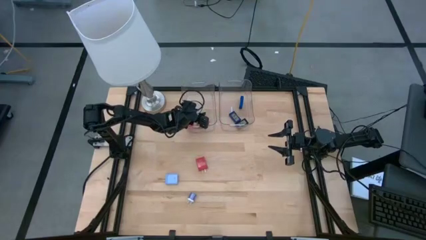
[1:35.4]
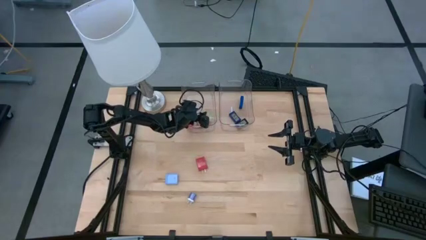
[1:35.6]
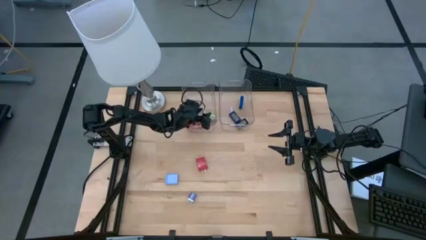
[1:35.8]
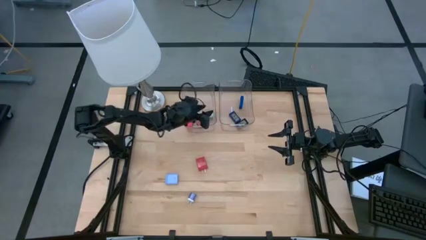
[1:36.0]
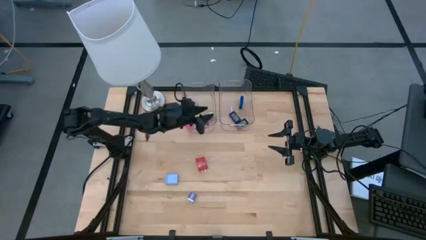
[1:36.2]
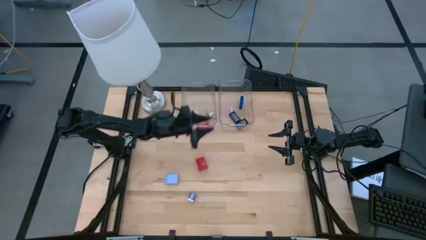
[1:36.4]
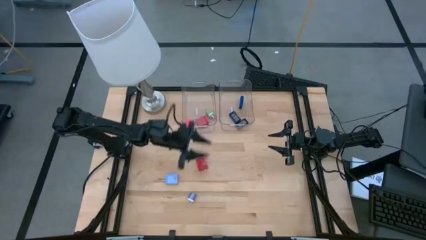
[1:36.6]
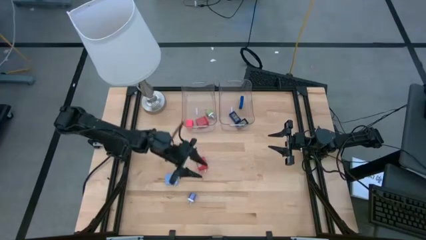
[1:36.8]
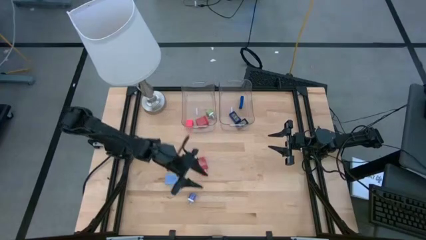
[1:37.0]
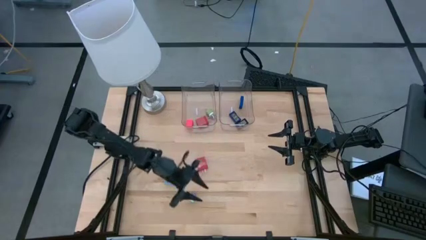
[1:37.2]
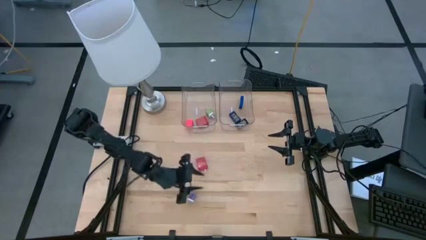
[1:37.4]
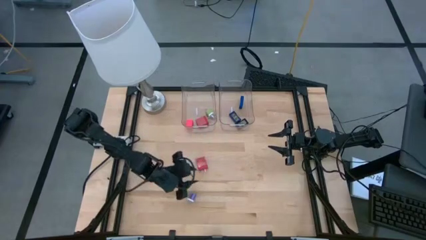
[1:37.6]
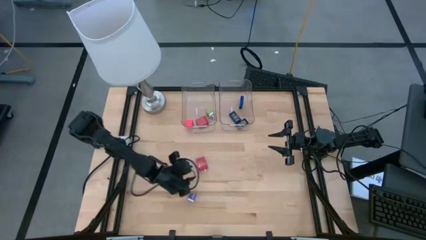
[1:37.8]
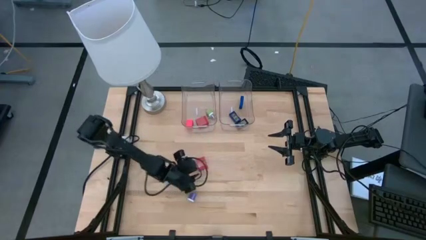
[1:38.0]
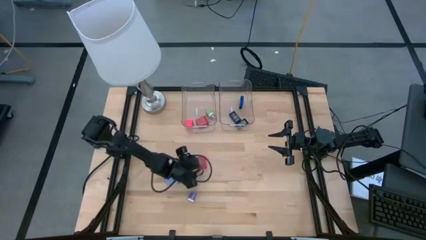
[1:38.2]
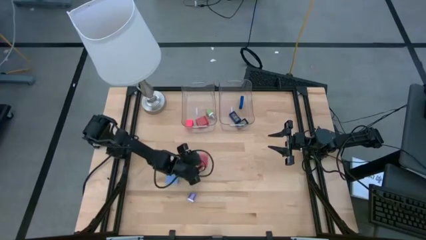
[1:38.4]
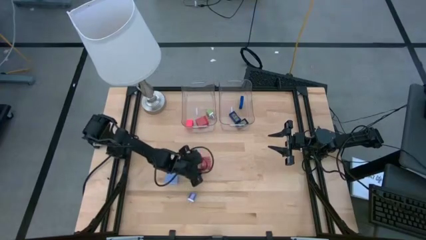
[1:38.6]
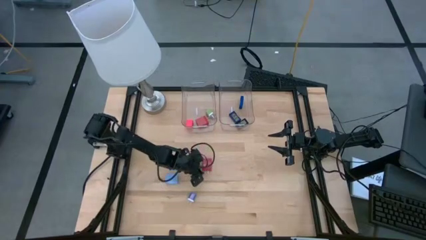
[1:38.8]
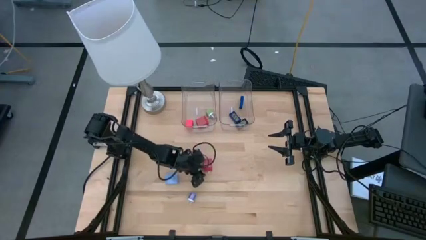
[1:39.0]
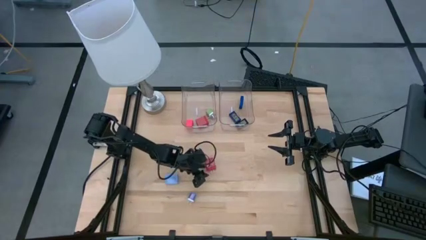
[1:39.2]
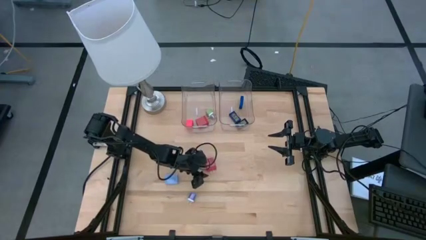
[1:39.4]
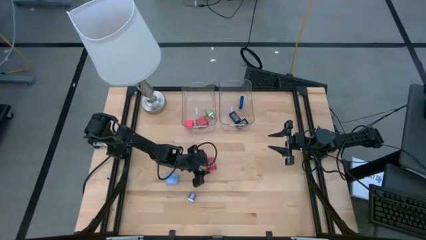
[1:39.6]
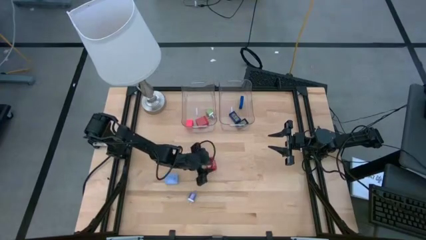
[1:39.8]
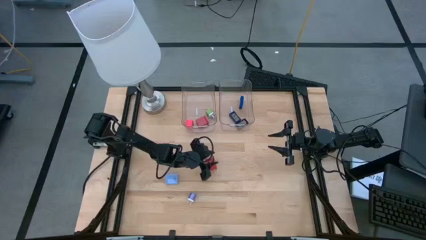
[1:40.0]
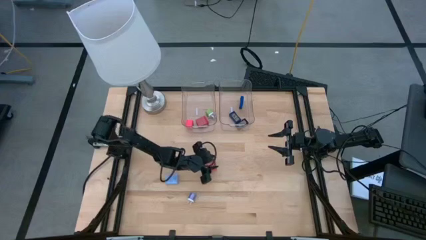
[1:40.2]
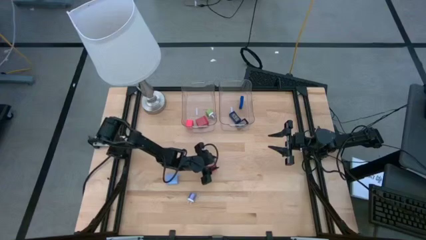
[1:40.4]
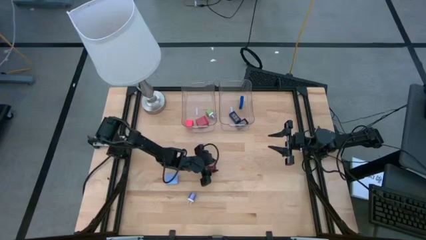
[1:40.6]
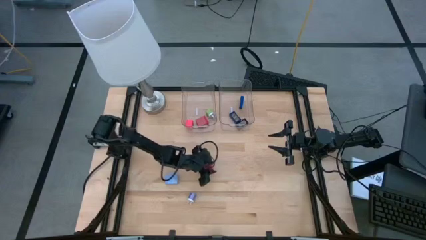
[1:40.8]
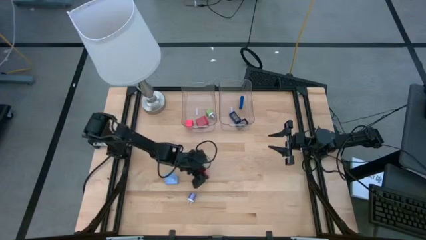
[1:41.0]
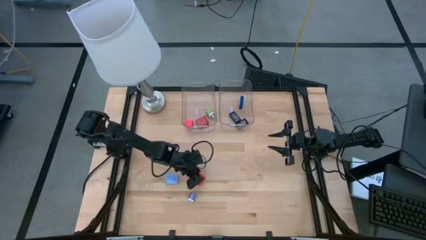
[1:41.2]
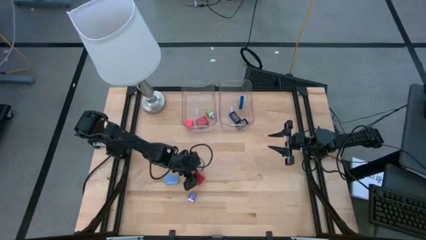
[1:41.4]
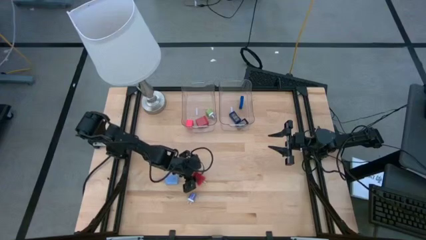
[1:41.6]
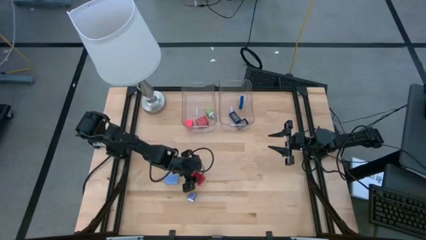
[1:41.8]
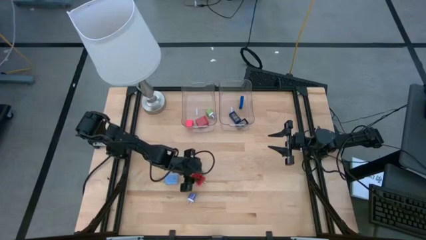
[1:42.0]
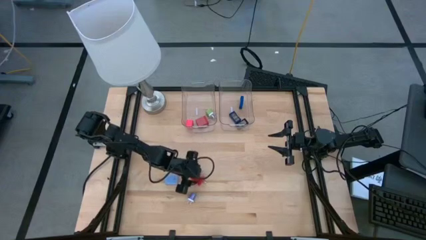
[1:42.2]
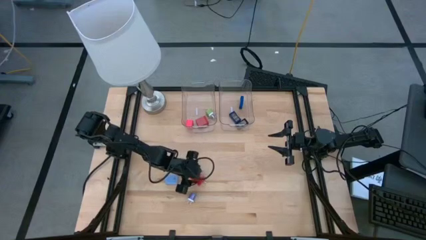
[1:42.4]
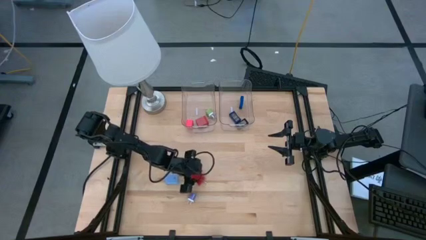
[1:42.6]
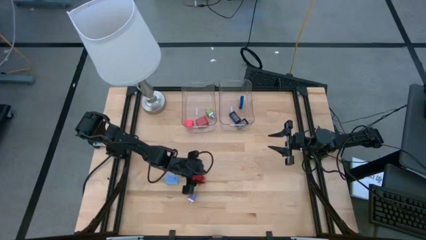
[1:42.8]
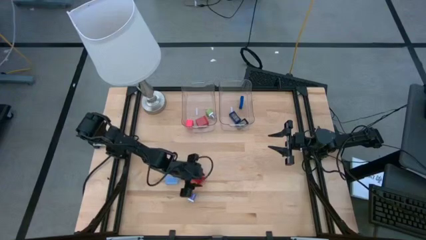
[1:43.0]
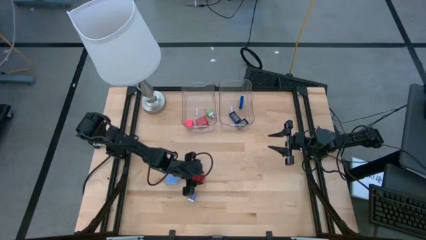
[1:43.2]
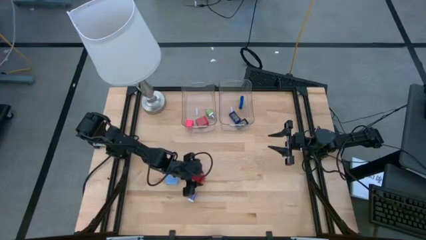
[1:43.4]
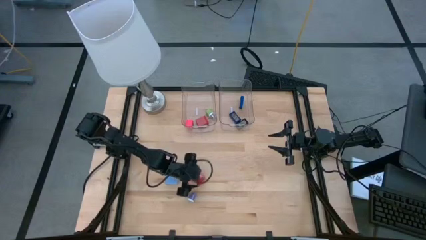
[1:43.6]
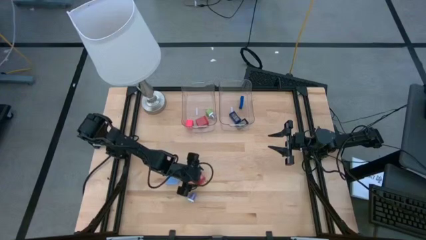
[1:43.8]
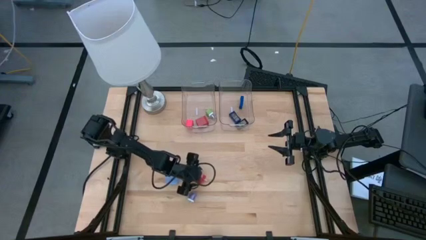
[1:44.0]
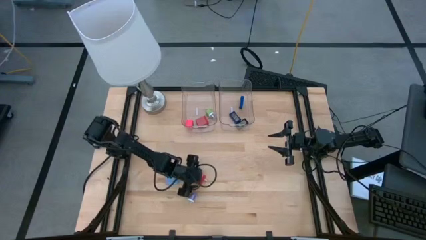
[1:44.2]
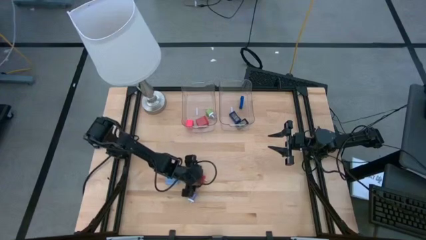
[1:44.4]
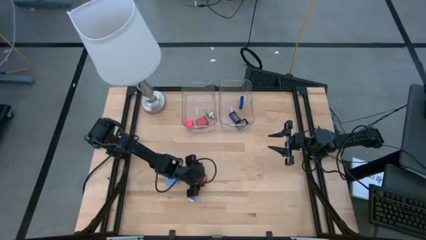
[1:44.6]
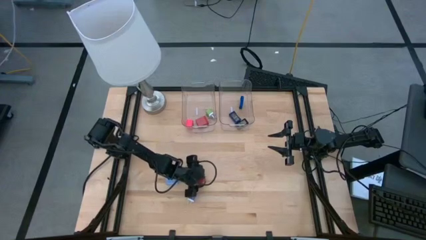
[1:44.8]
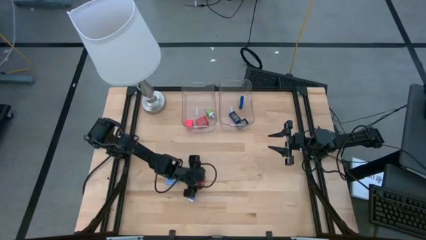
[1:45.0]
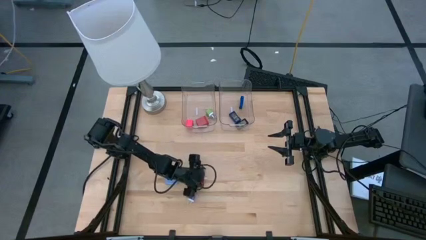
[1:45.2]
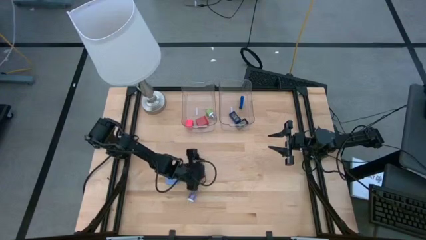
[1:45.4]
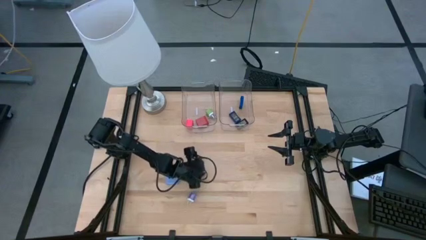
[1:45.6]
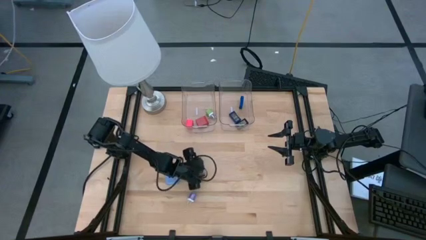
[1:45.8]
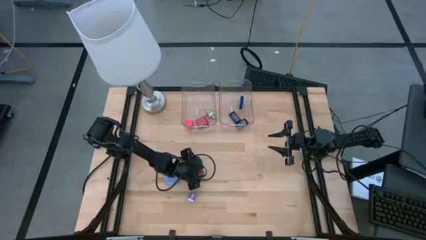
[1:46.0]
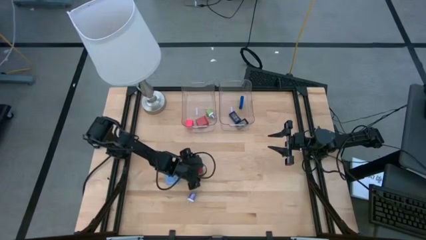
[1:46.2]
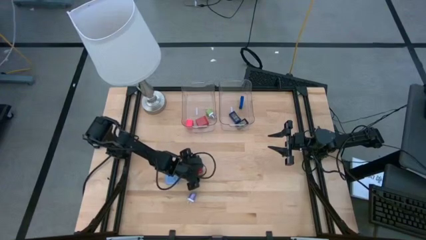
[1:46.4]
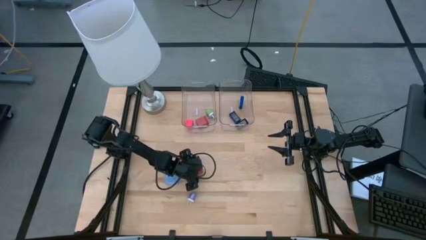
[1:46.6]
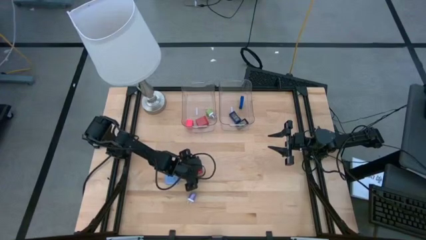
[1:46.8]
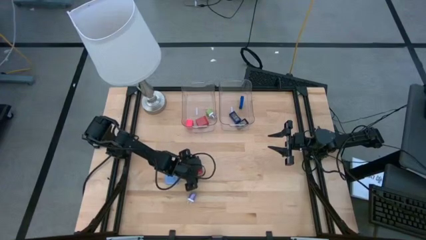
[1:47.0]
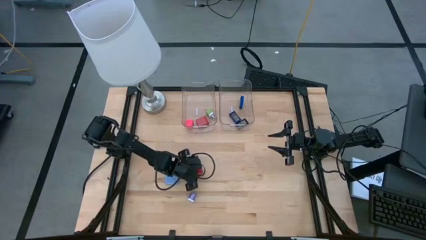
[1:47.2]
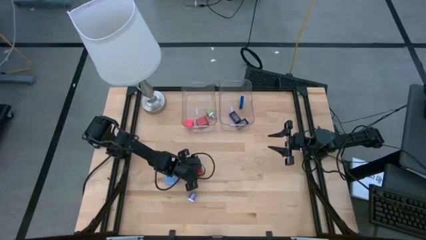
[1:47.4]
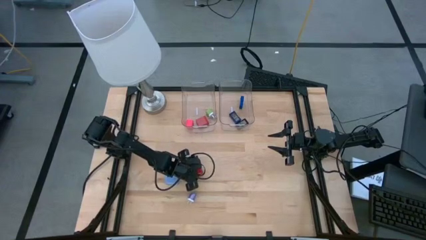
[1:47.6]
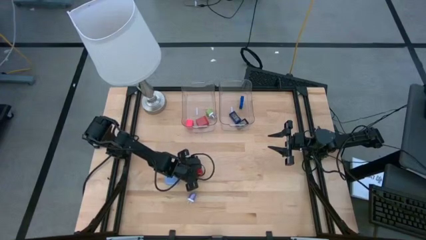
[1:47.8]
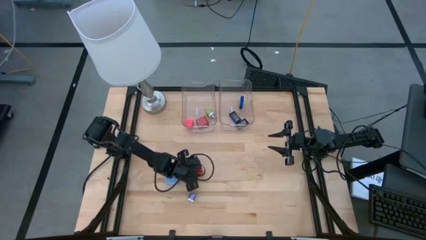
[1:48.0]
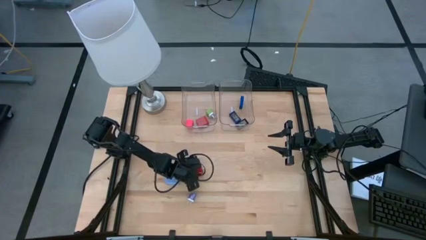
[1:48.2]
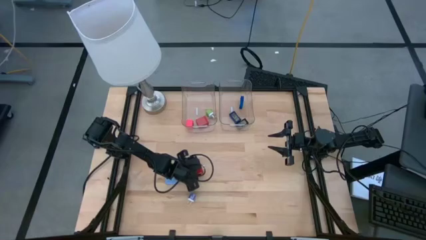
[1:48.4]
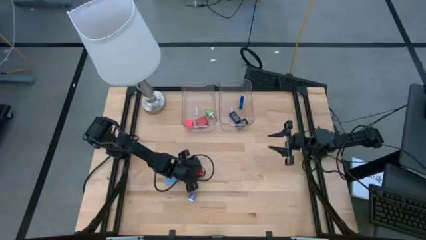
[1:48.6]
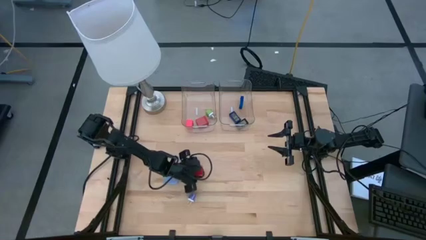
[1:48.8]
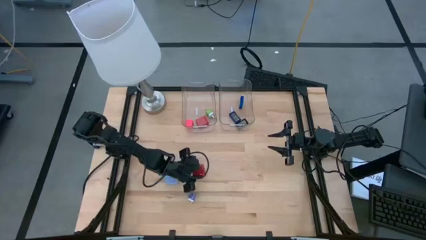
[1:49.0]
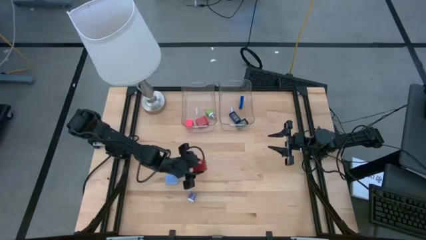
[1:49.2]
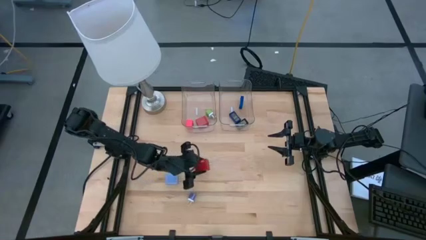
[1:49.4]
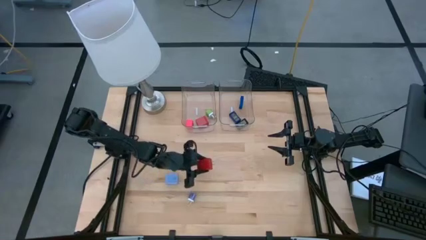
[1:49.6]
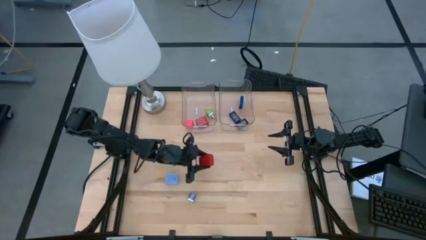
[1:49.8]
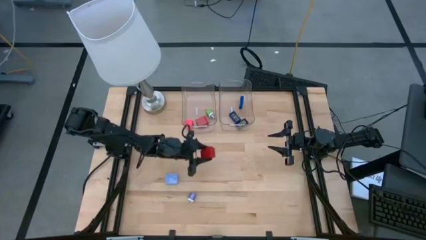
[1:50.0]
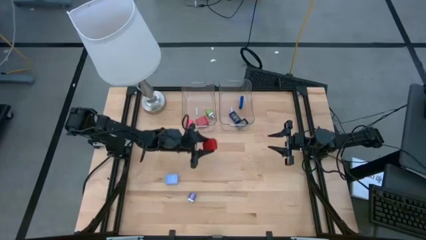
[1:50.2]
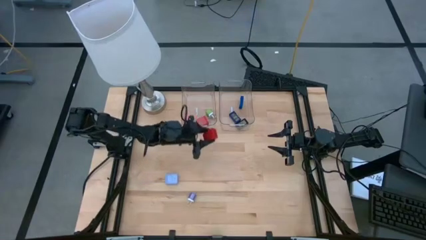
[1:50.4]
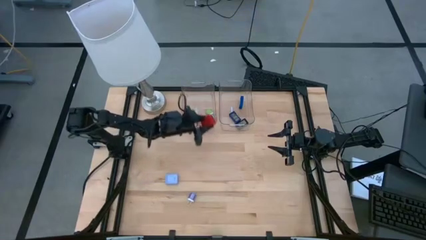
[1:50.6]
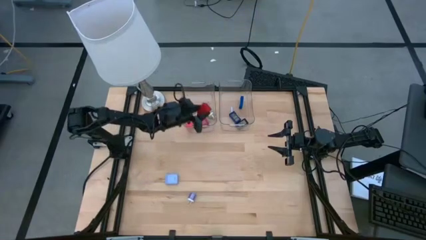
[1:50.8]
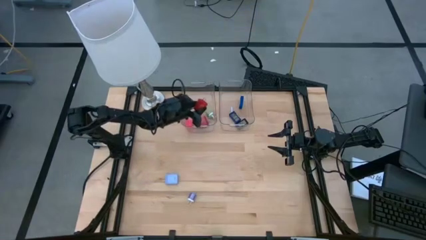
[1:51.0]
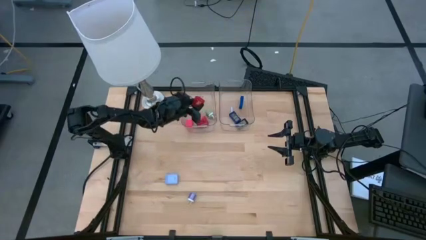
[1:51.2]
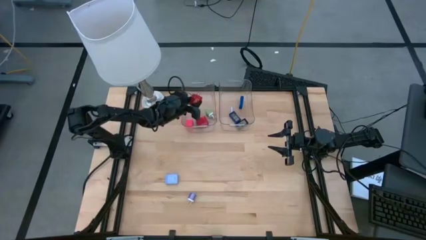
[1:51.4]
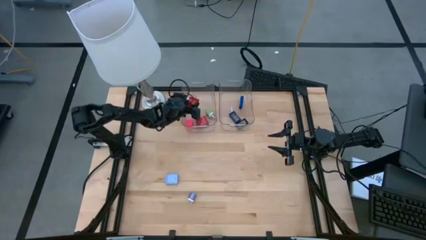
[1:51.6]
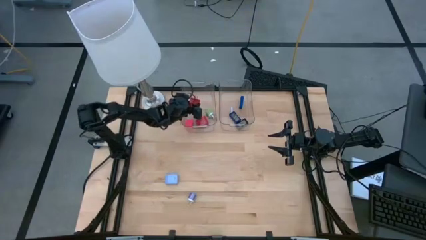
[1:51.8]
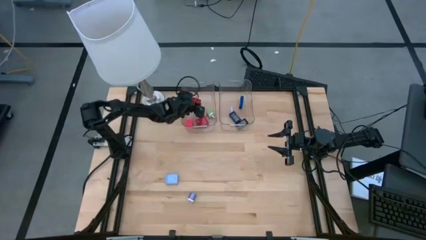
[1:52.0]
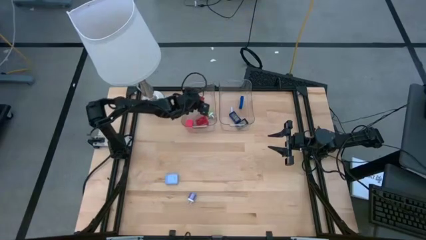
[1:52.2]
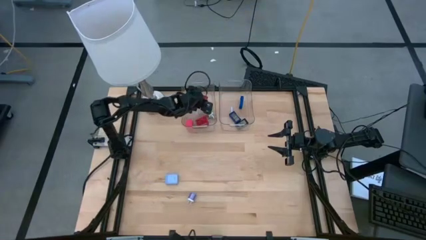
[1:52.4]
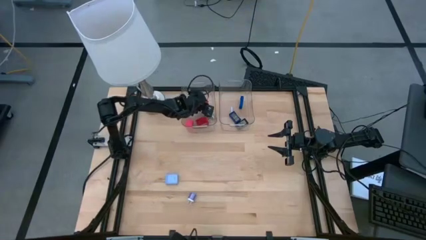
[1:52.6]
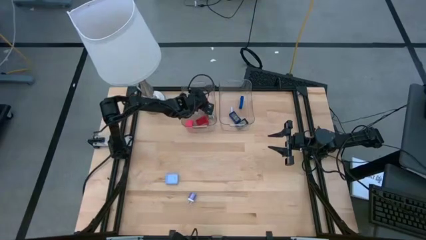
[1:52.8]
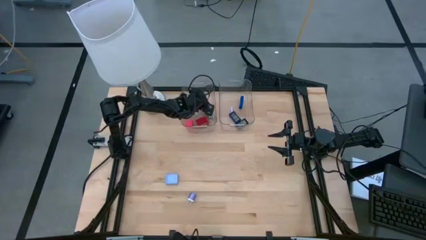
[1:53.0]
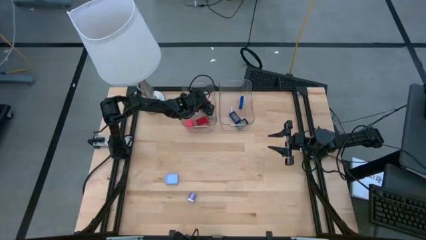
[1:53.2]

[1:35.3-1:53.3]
Task: Pick & Place Office items
Put the red charger adapter into the left transparent bin
